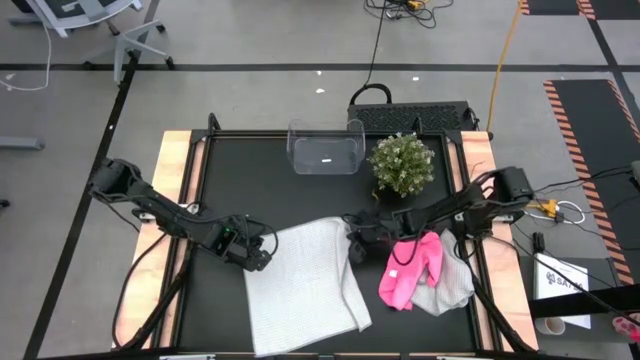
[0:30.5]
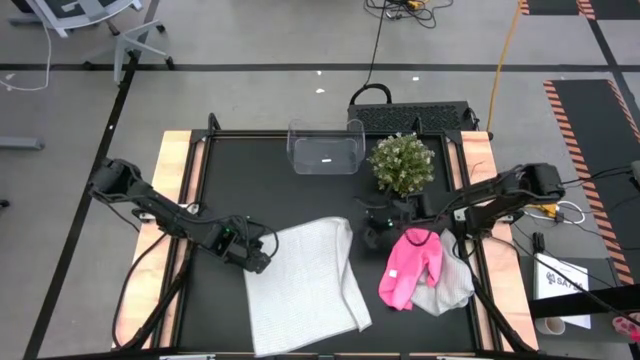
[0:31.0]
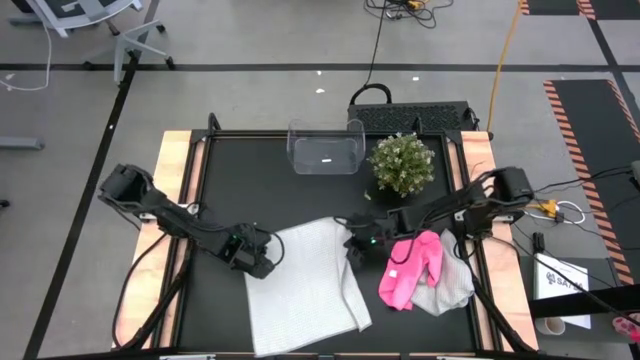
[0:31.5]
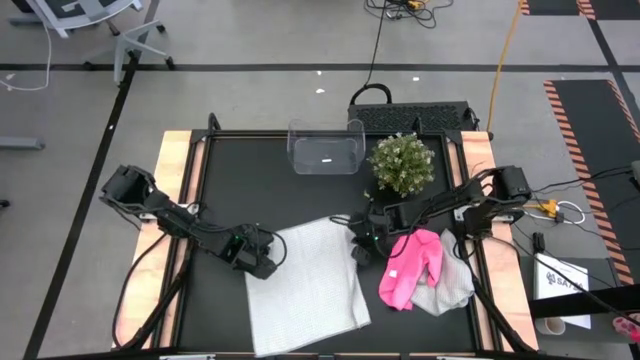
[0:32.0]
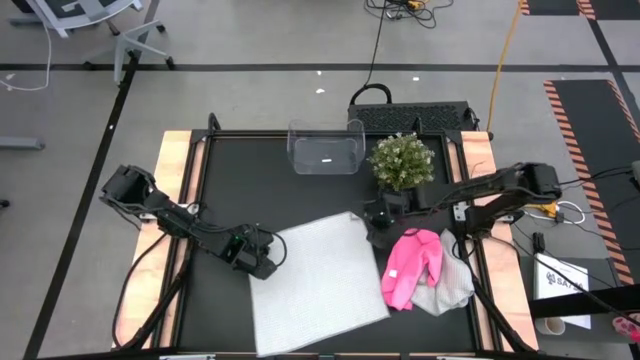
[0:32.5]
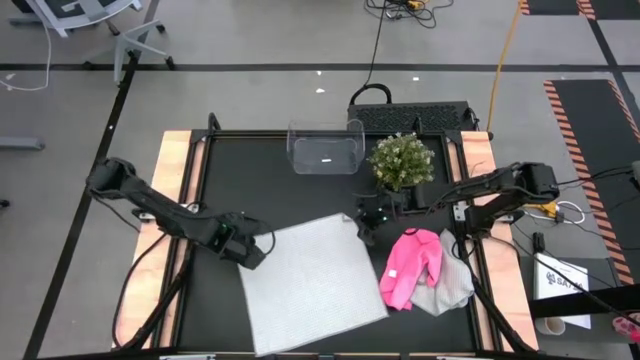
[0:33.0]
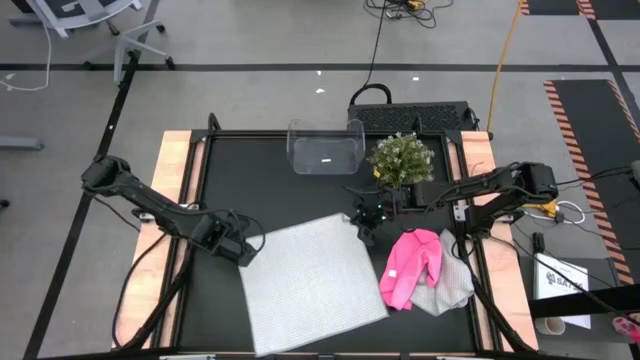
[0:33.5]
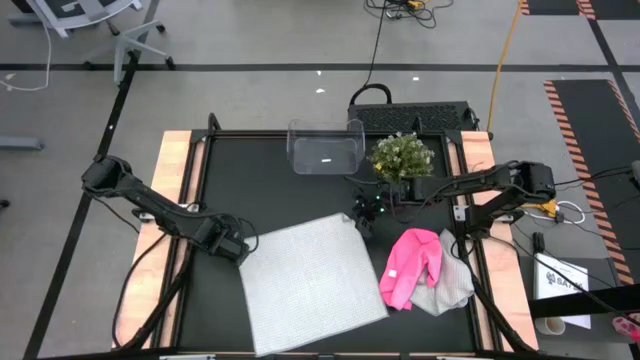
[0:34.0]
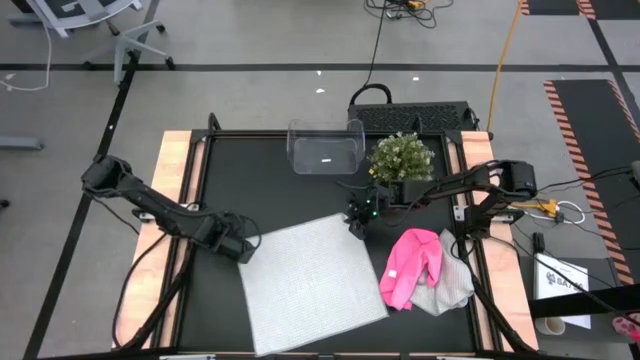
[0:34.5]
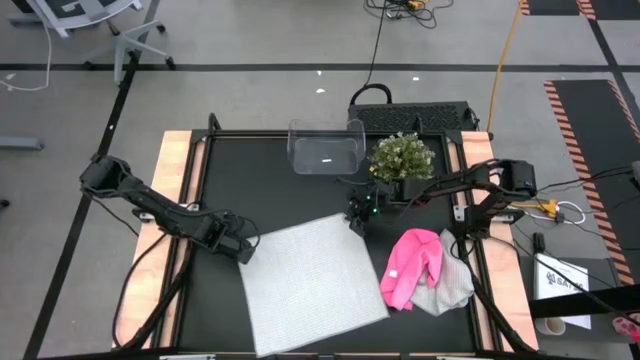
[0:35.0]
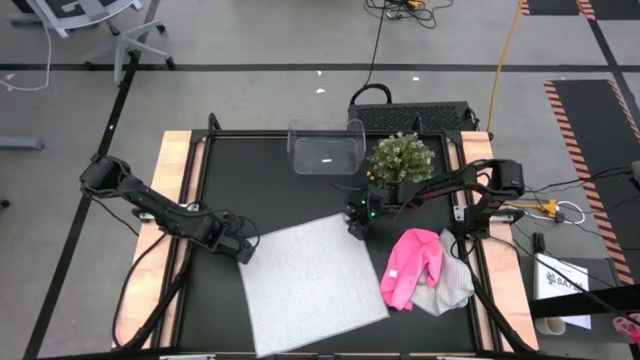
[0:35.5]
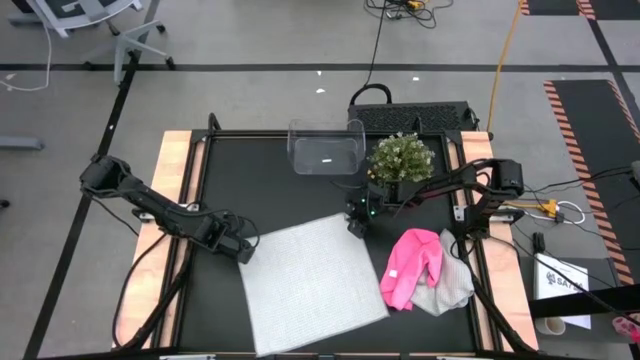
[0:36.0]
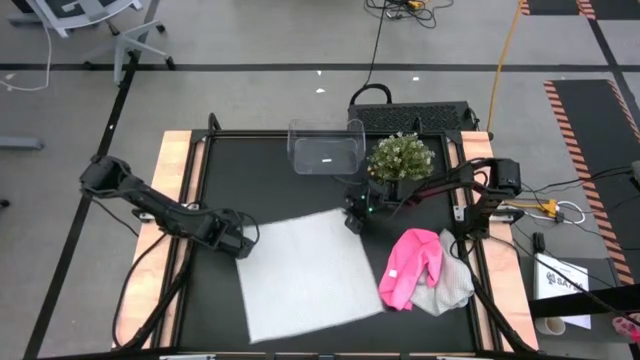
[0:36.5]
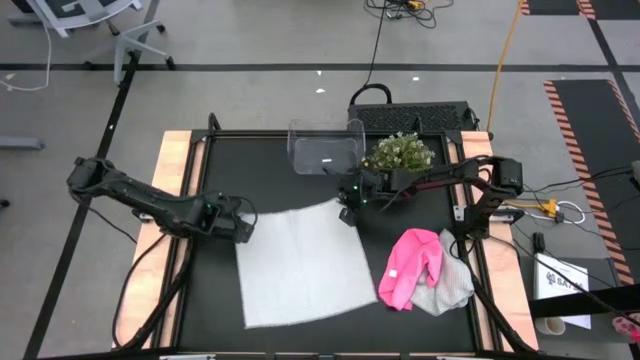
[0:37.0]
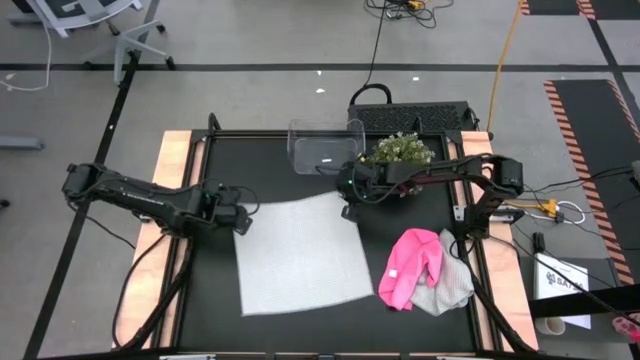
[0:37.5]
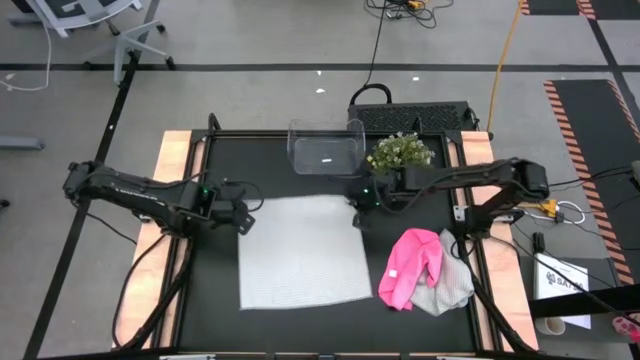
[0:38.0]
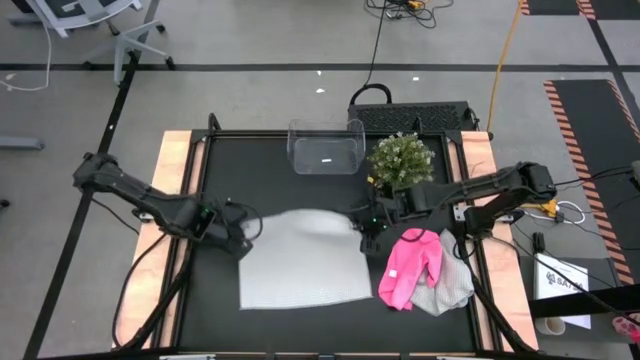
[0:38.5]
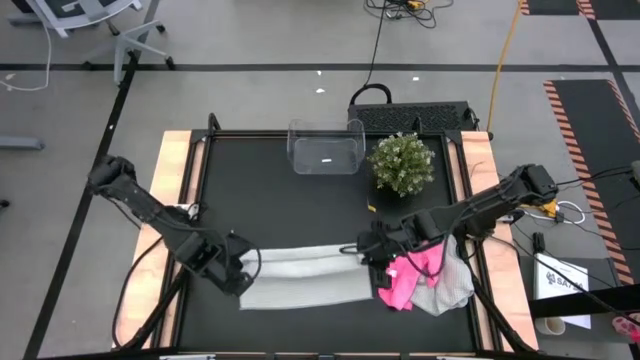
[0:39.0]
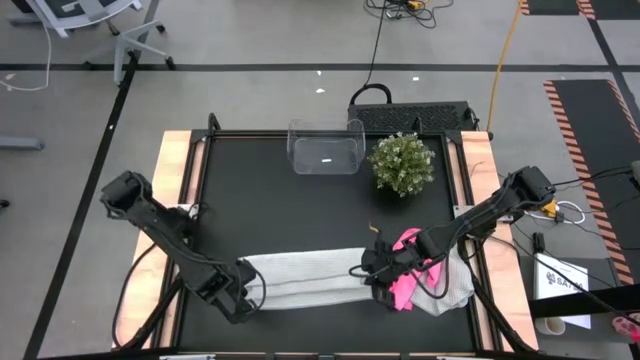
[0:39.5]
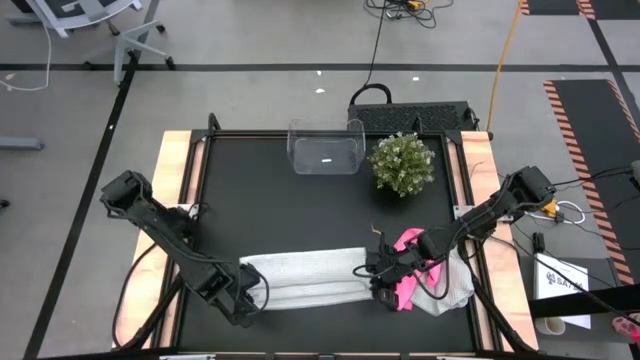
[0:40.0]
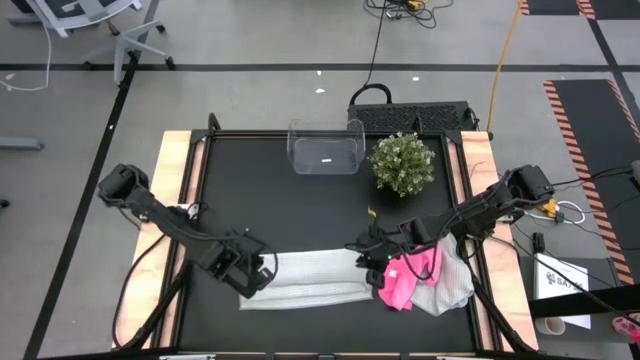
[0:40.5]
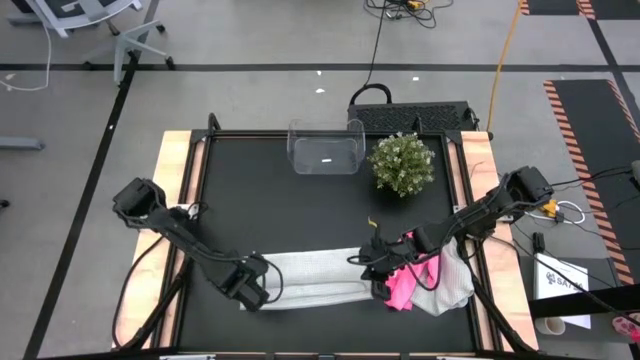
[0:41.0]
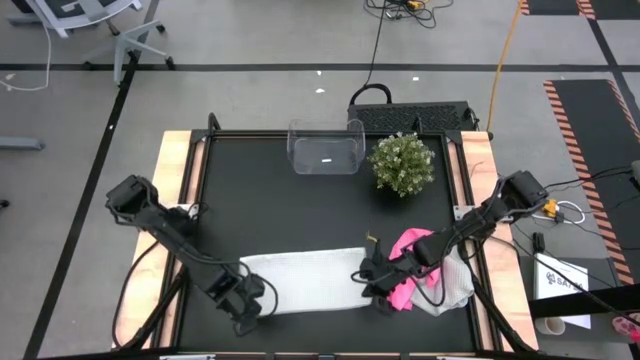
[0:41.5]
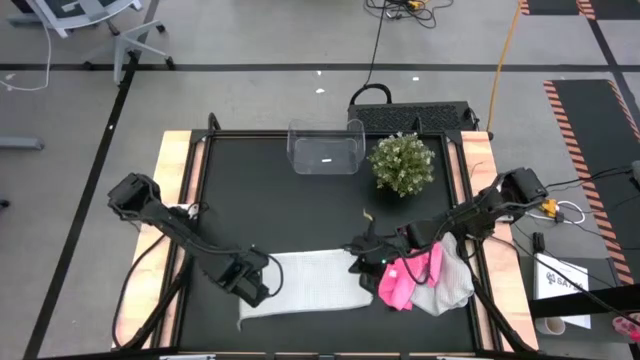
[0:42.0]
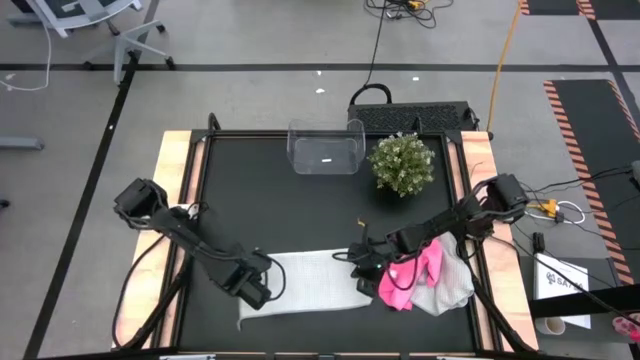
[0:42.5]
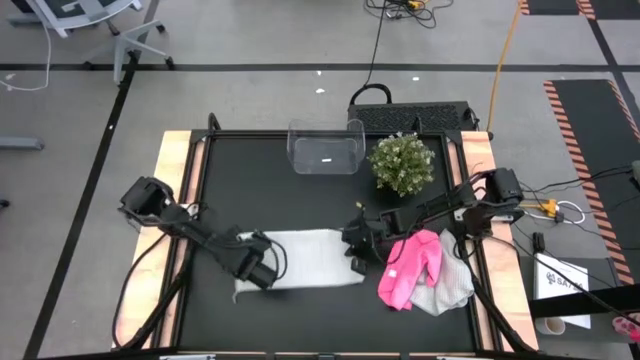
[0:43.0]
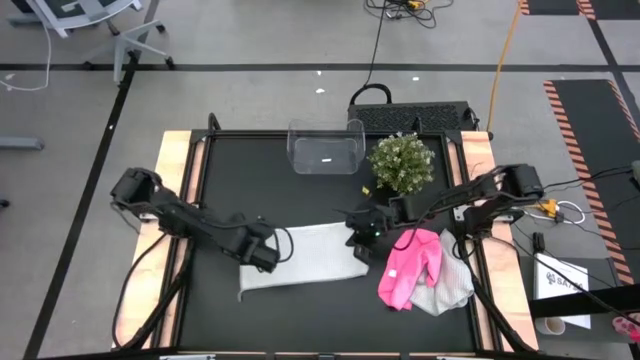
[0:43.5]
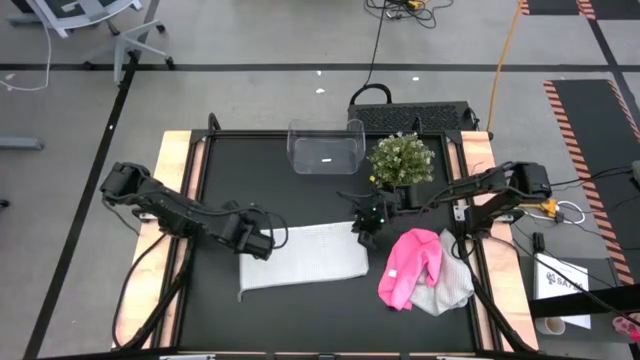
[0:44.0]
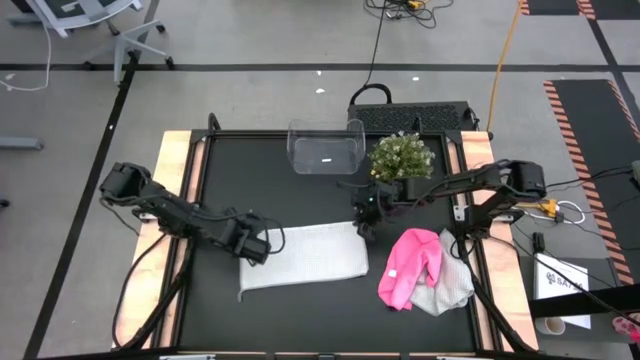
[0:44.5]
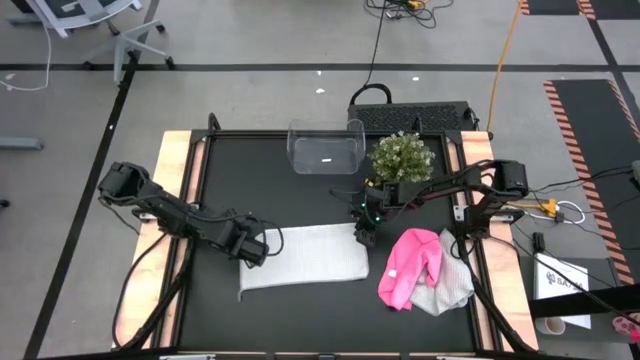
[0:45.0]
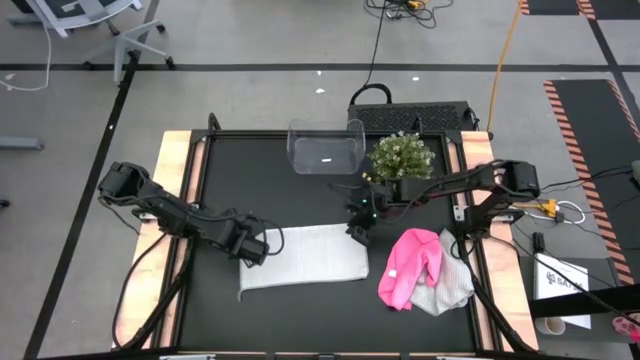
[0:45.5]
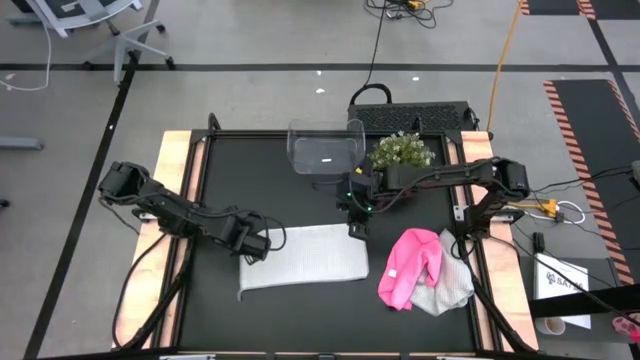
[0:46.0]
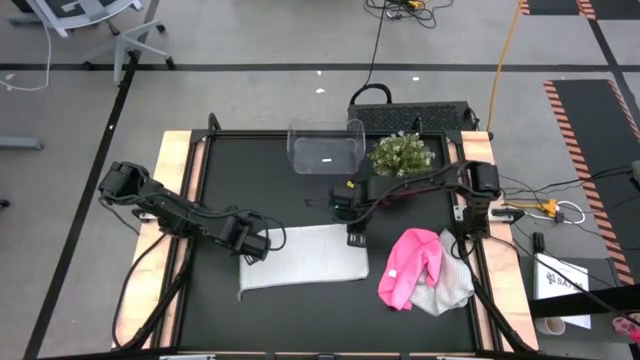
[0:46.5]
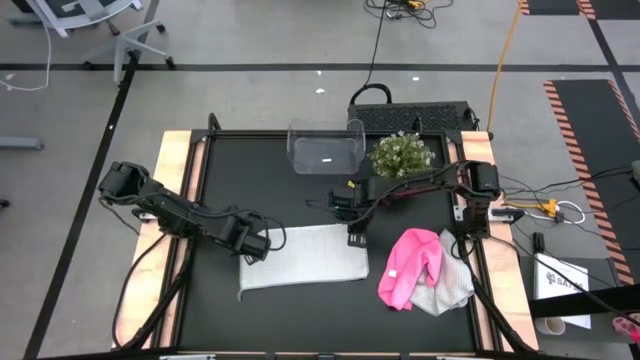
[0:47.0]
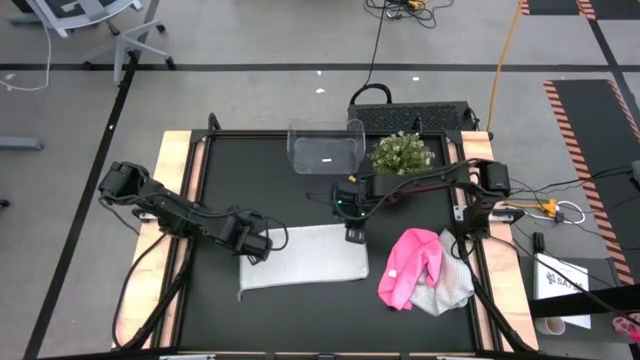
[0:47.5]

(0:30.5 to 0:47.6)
Task: Fold microfiber towels
Fold the left gray towel

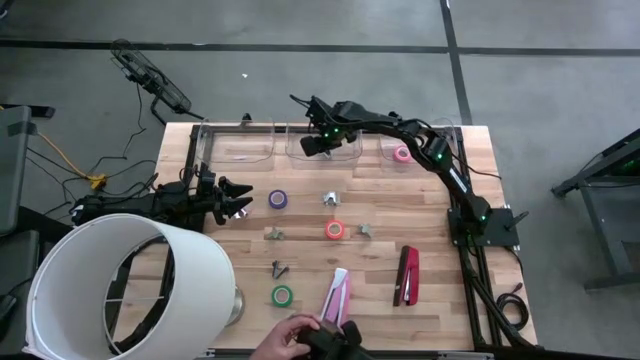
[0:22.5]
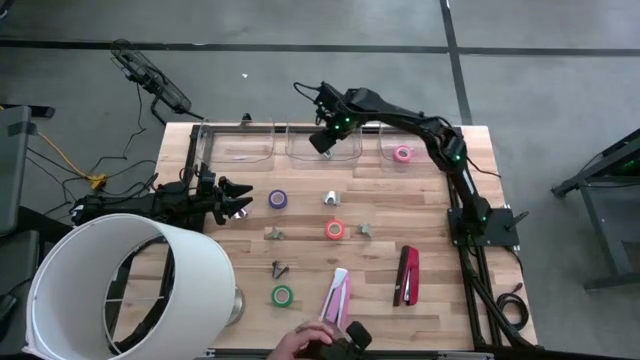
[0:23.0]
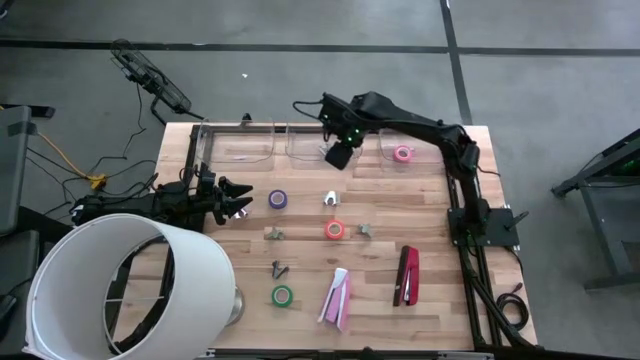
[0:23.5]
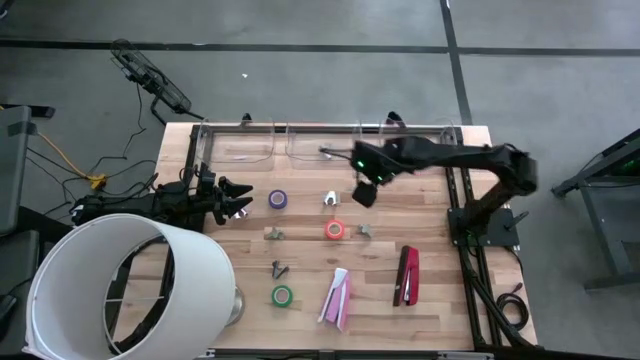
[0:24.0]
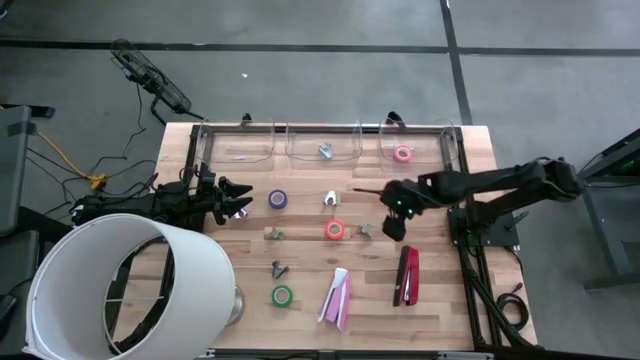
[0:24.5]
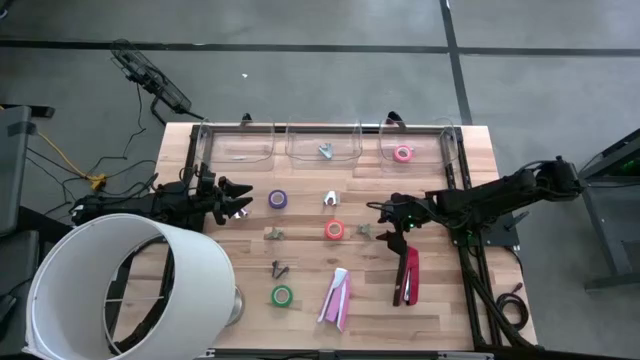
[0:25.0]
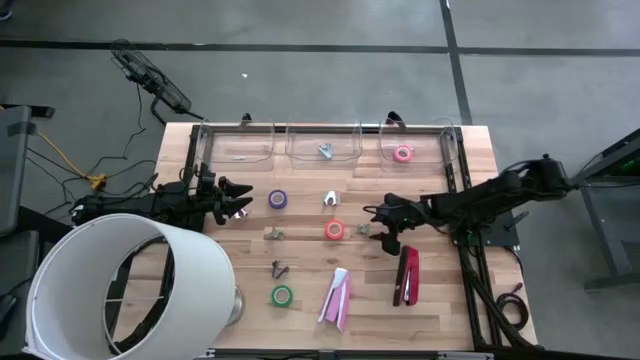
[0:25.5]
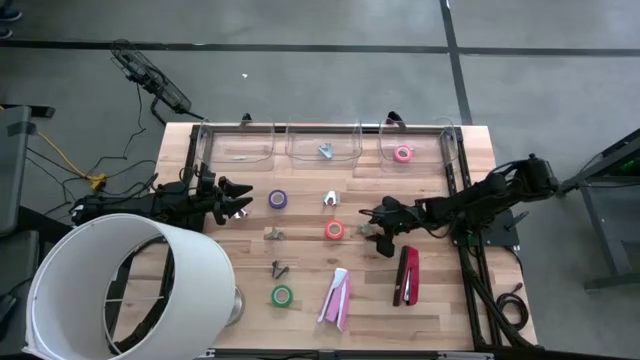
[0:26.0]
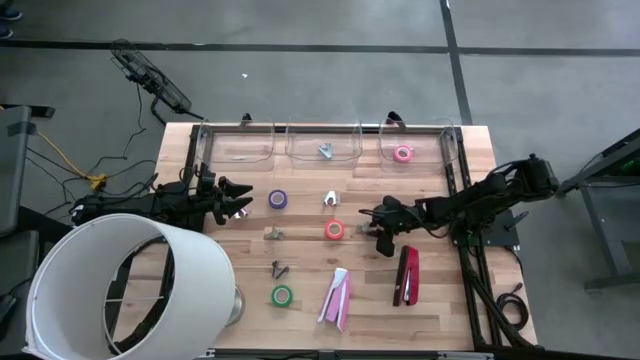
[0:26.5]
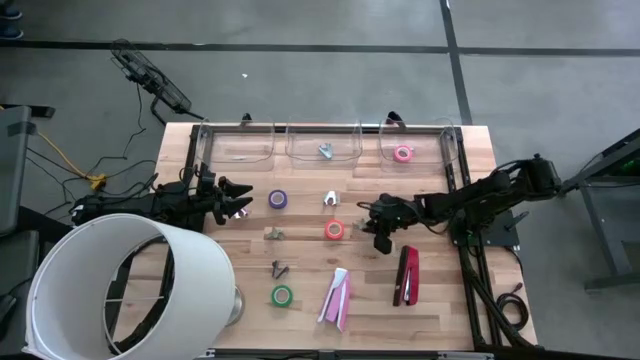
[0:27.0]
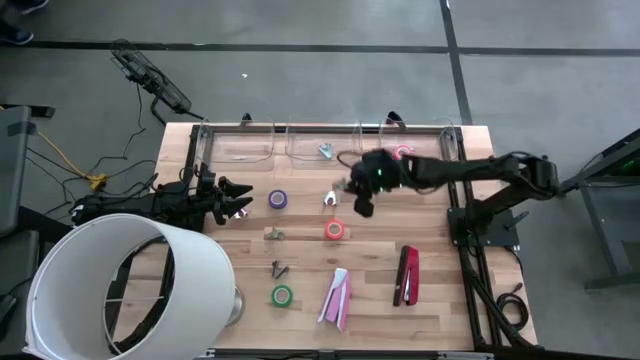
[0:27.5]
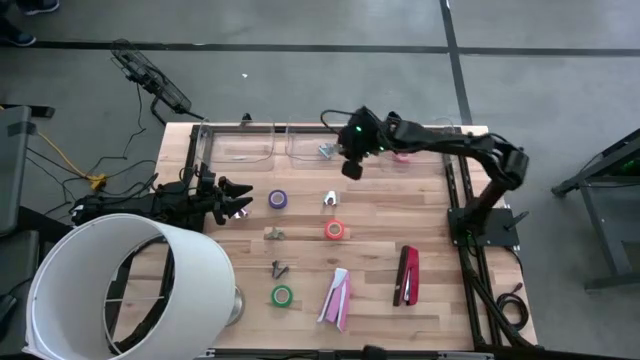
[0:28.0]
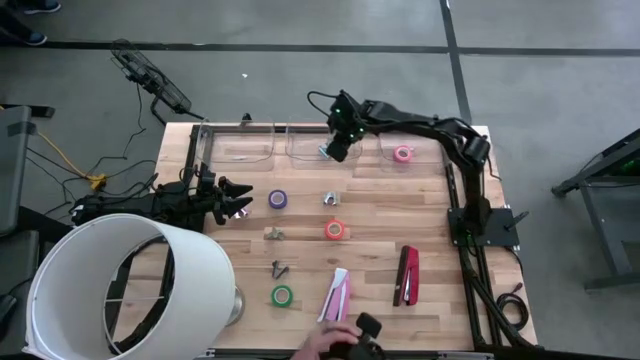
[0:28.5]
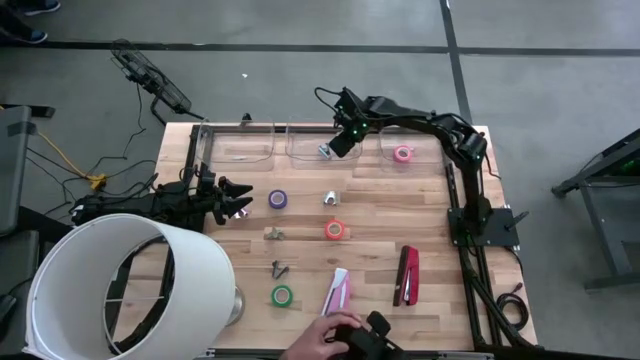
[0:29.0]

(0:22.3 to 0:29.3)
Task: Pick and place Stapler, Stapler remover, tape
Put the right gray stapler remover into the middle transparent bin
